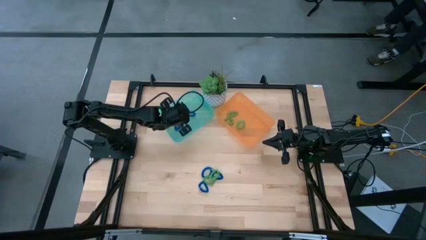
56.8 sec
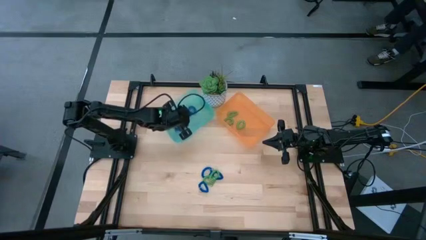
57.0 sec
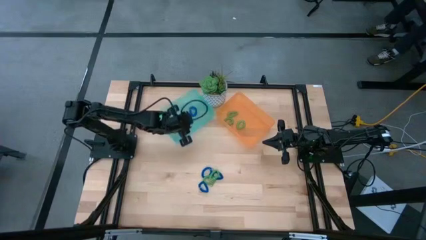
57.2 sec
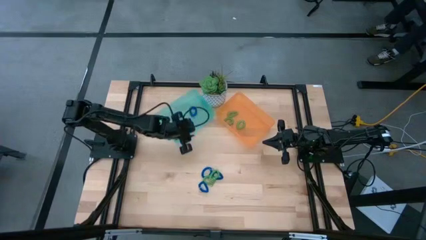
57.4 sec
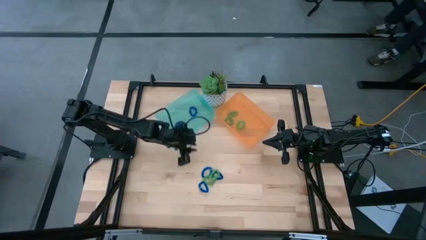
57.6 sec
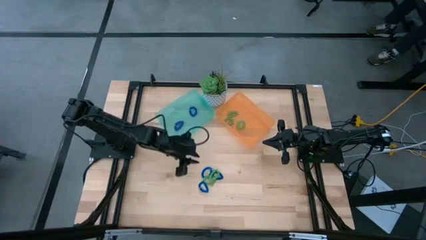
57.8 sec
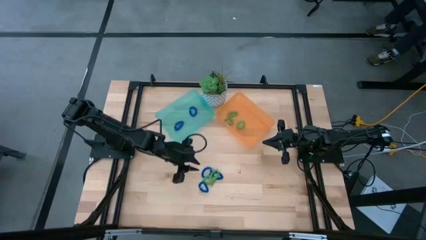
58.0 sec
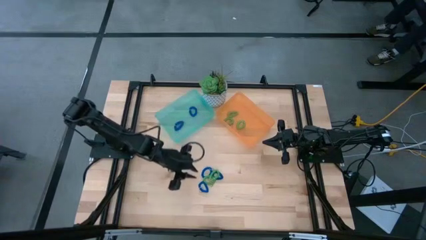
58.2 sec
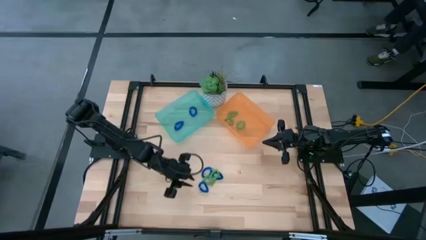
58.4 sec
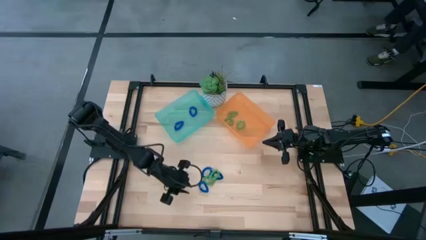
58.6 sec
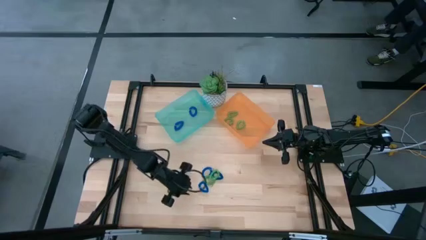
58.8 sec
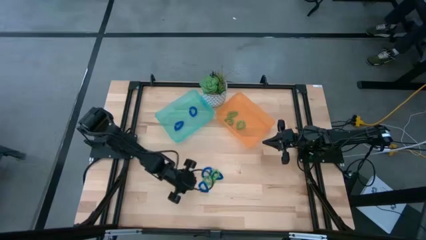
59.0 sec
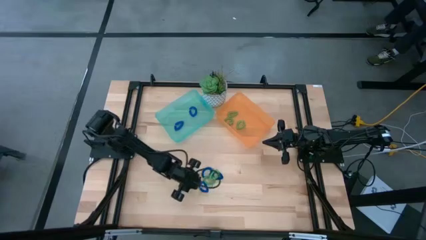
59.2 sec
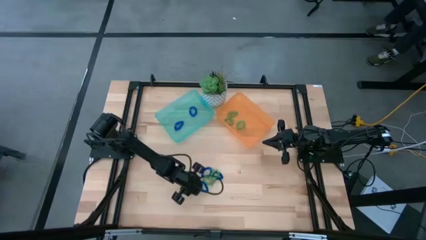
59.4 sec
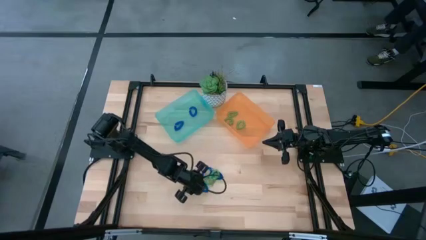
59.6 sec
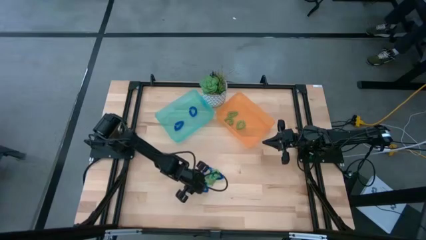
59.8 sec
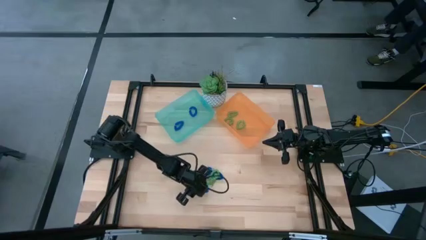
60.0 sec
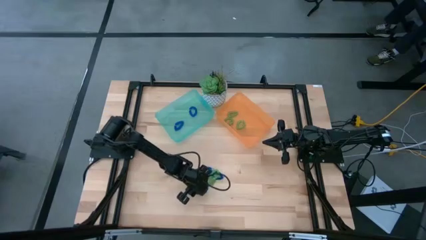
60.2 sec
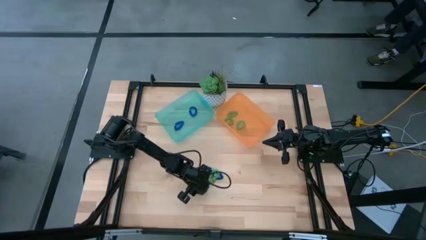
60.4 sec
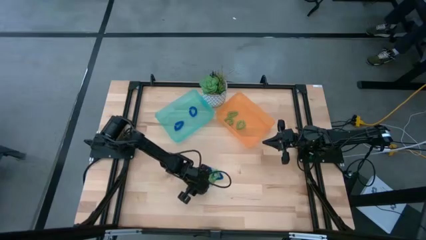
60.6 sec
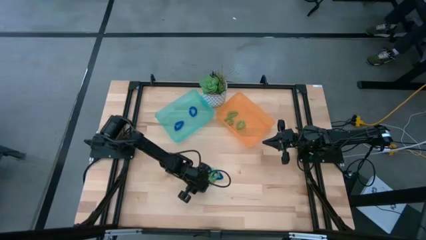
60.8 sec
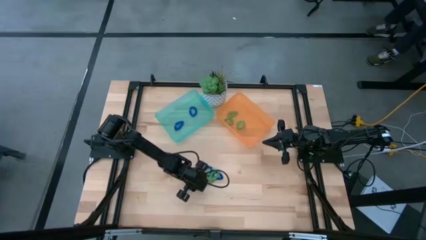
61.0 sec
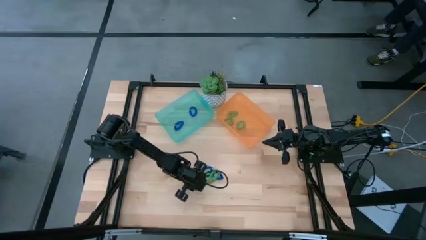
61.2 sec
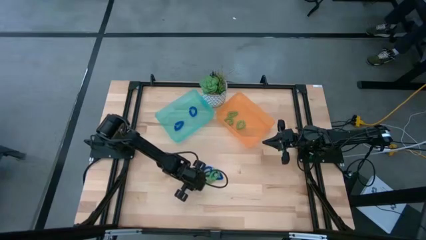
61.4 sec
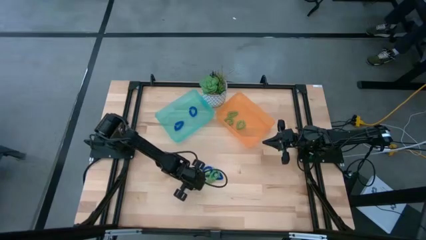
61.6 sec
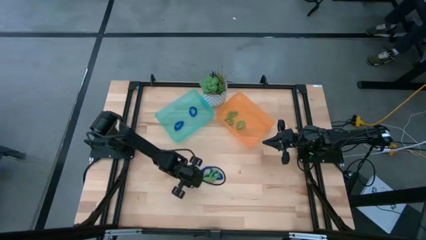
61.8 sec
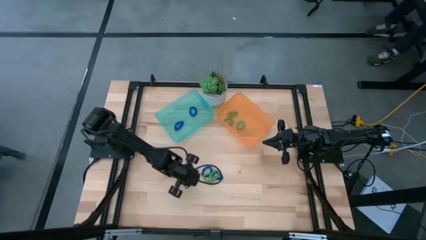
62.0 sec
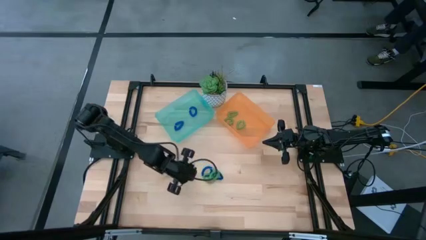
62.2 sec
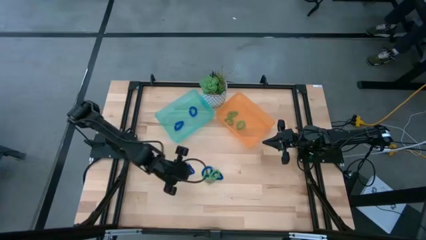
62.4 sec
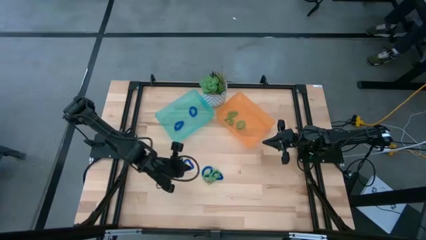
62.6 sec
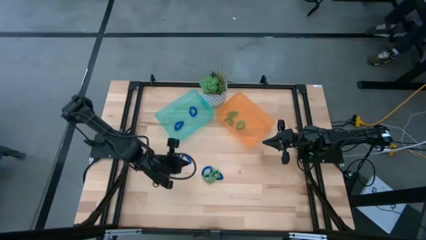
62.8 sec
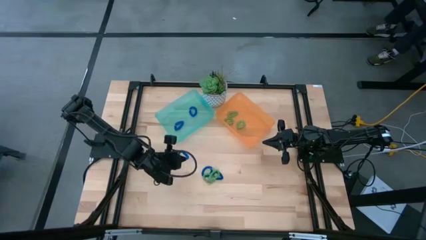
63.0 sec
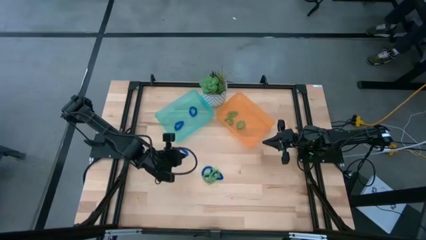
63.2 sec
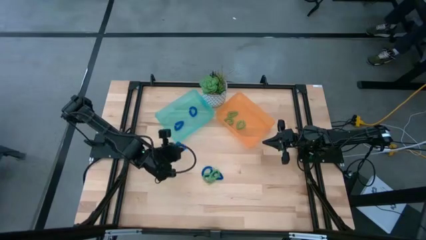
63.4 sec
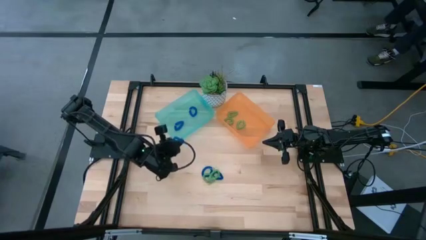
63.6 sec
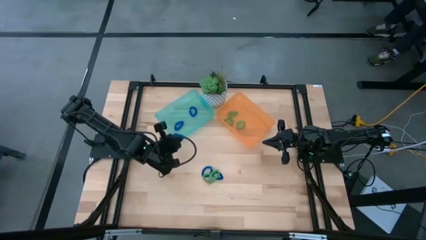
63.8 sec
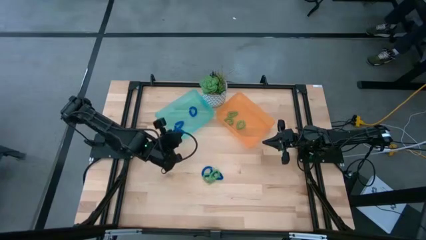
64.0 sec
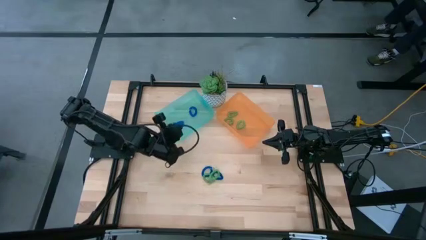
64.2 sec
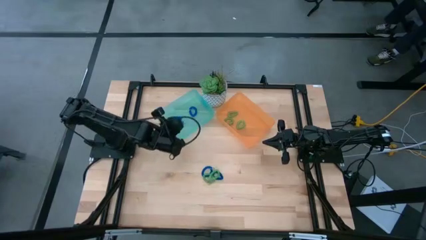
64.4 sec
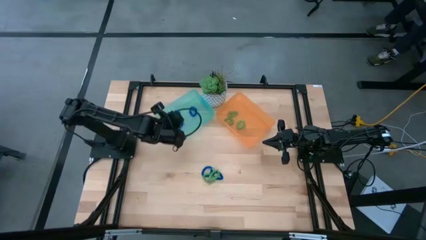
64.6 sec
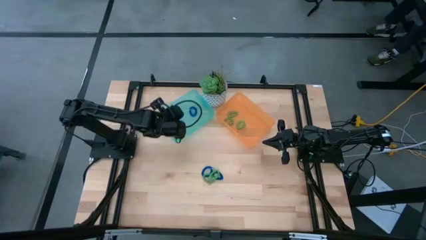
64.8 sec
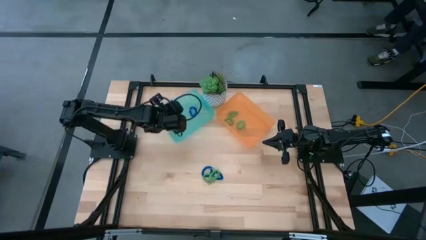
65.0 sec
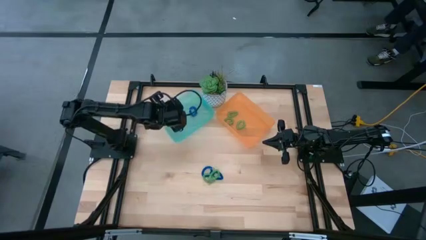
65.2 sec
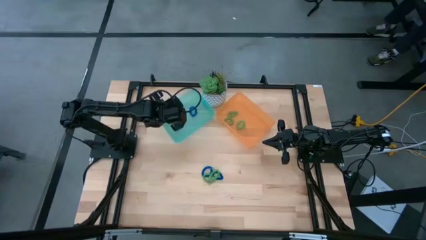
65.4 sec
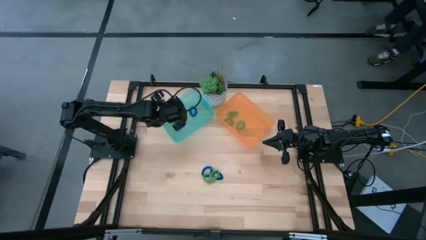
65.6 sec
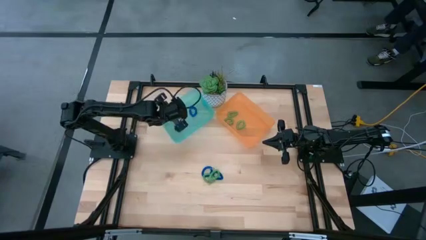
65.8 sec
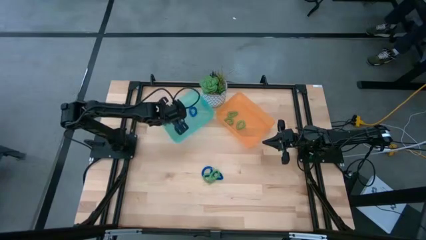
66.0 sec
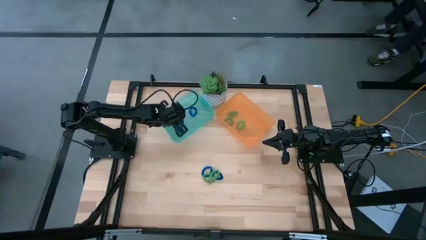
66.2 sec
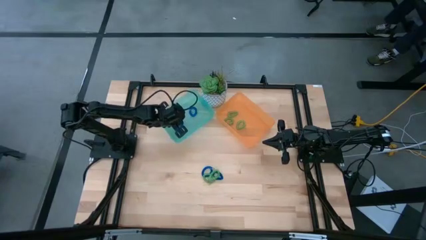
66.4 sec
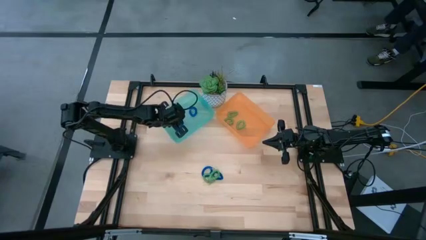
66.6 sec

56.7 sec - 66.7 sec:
Task: Sort spring keychains
Put the blue spring keychain into the green bin

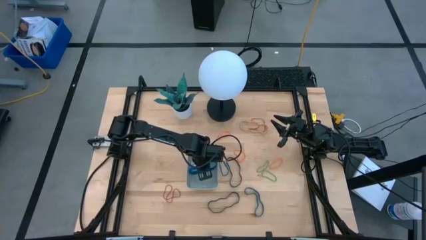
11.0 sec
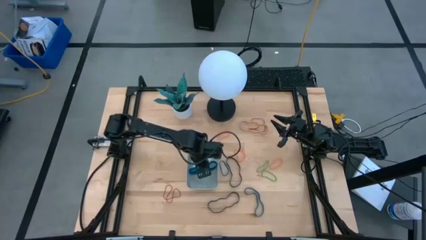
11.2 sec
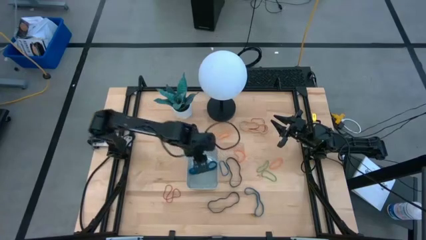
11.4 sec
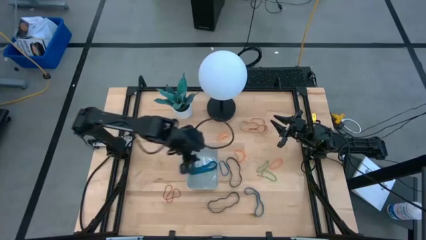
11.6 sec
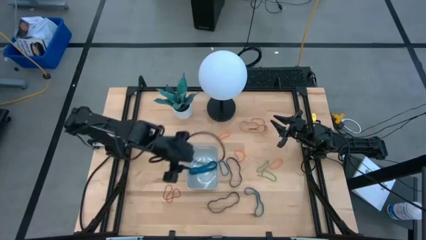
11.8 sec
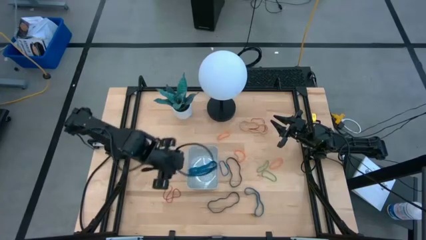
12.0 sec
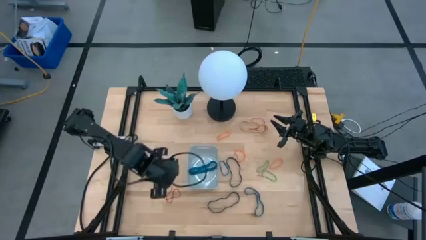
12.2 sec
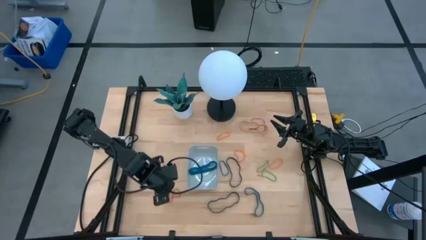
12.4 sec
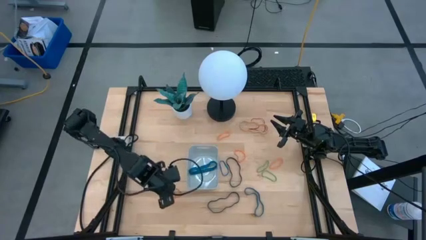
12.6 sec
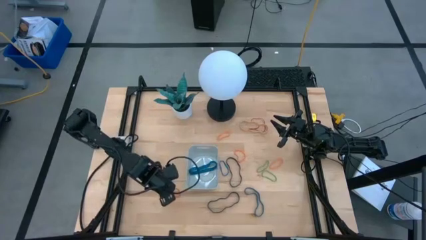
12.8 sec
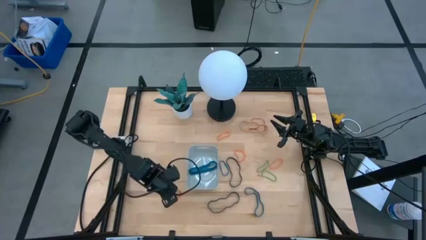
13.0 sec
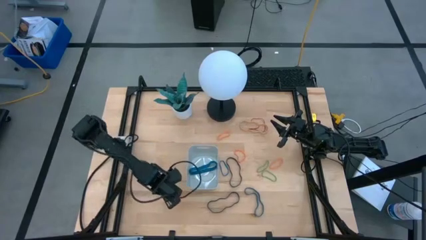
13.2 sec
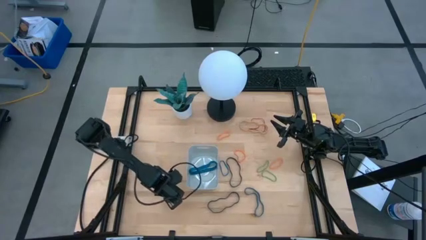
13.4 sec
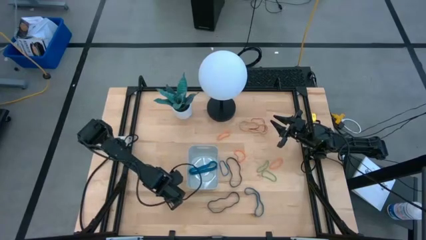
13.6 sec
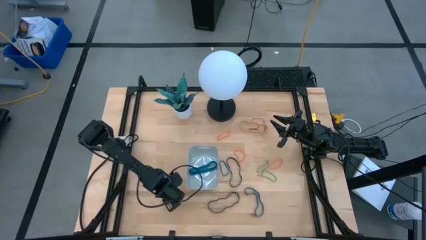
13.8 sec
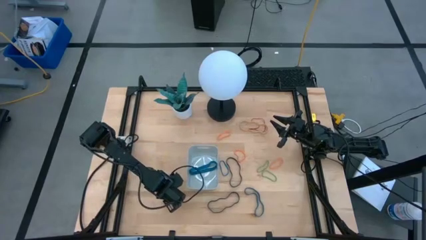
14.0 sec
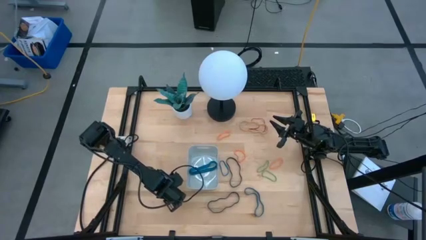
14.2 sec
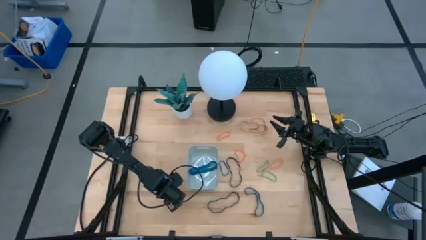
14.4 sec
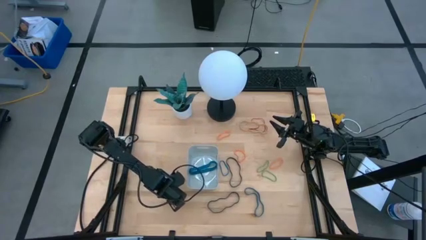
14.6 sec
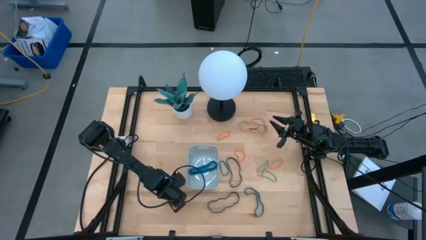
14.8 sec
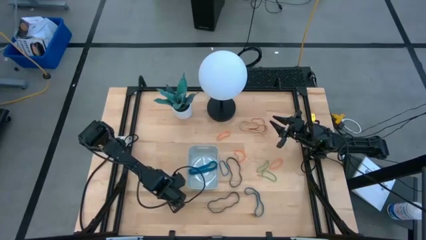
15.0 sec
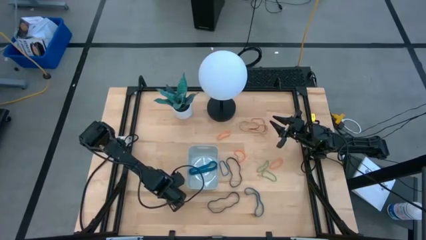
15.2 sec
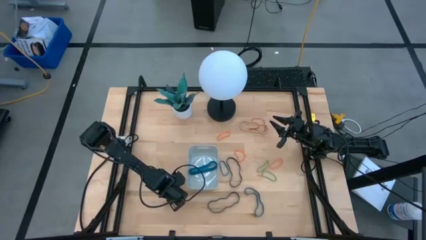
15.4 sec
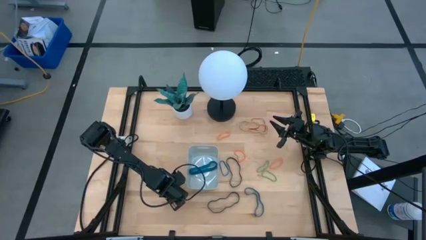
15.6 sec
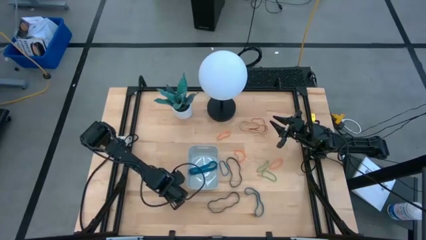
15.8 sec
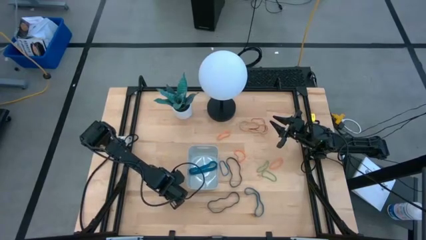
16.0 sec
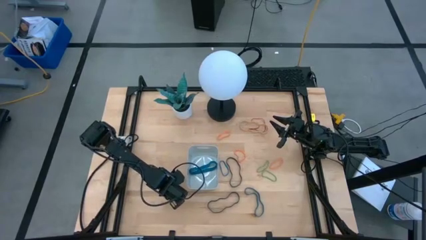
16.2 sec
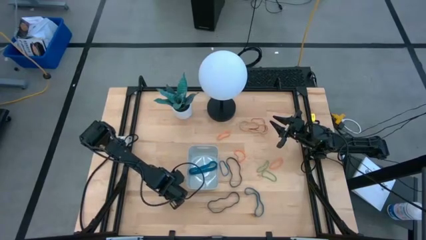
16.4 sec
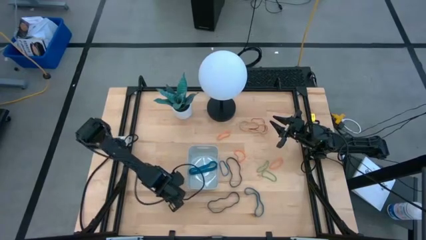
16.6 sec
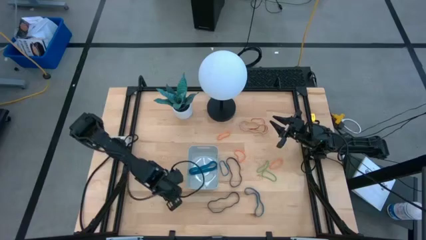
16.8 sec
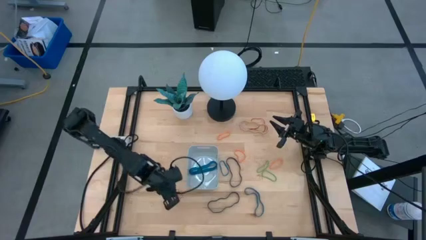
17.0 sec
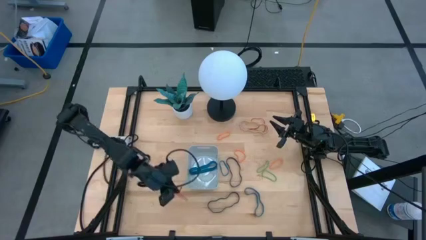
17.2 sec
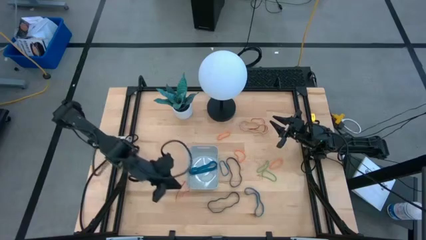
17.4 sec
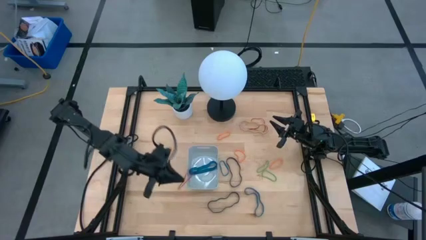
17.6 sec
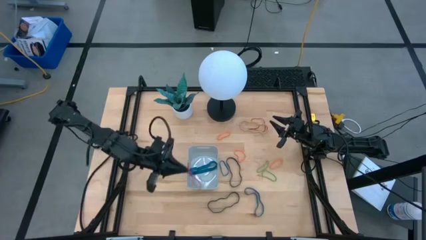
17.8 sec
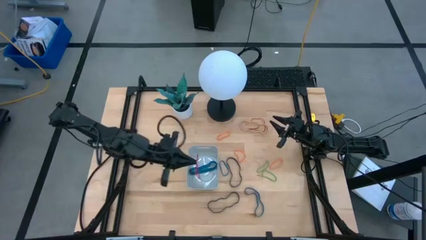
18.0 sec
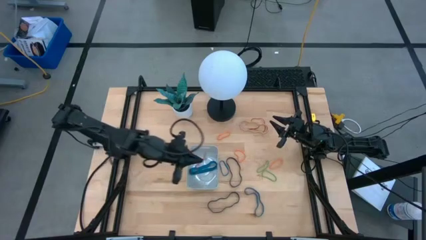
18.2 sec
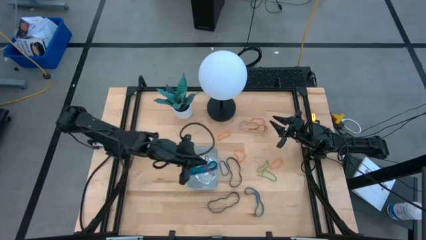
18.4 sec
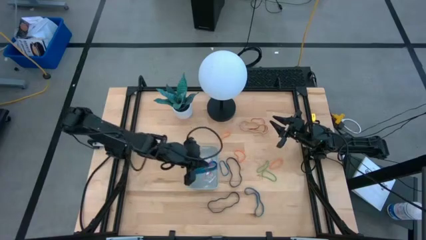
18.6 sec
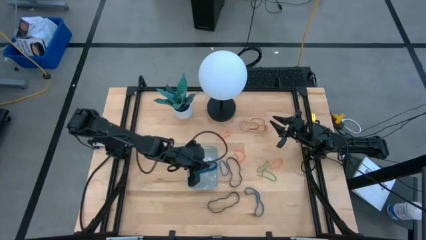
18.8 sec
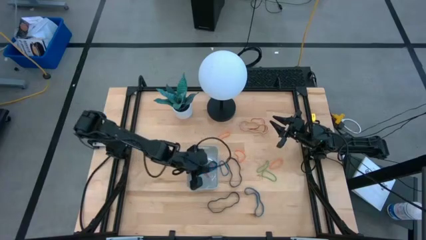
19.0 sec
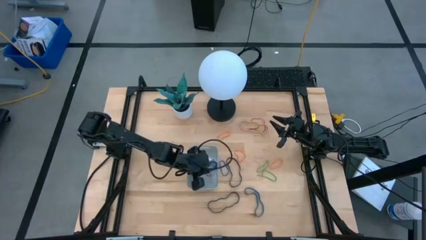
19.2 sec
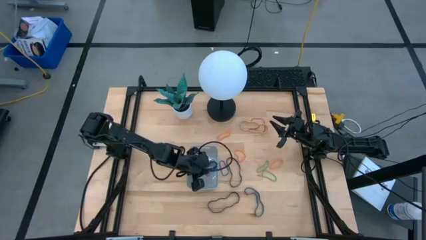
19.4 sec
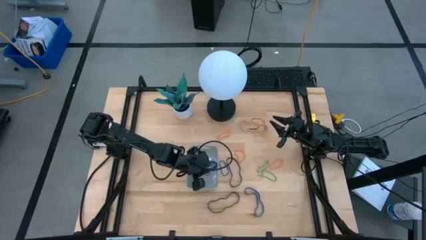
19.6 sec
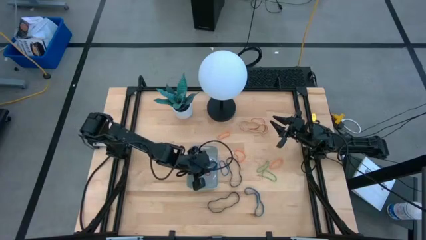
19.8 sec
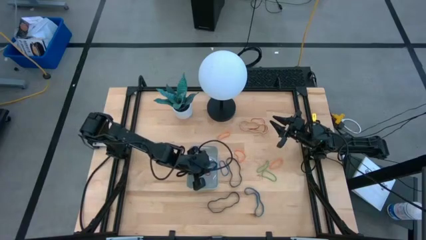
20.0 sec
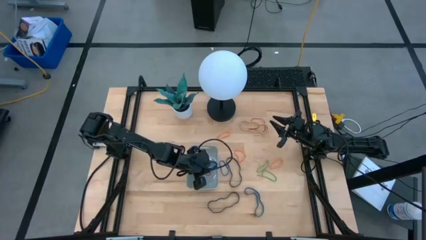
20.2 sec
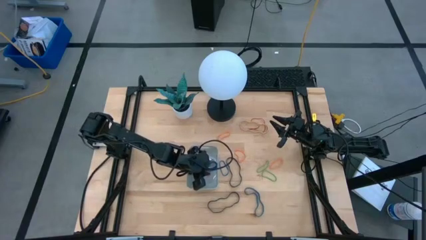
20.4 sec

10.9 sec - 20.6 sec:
Task: Pick and place rubber bands into bin
Put the bottom red rubber band into the gray bin
